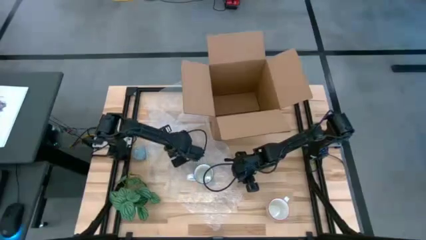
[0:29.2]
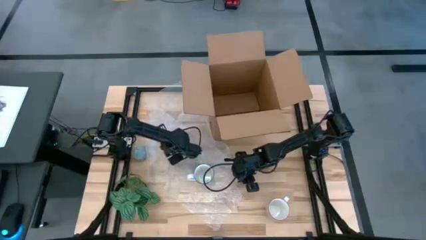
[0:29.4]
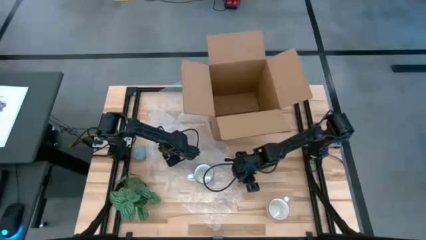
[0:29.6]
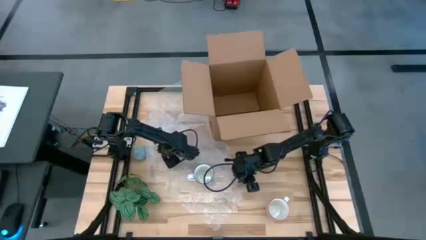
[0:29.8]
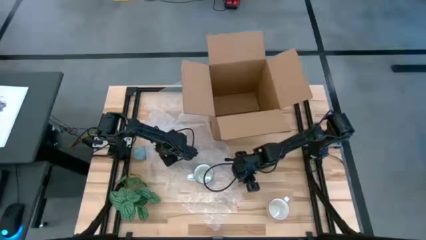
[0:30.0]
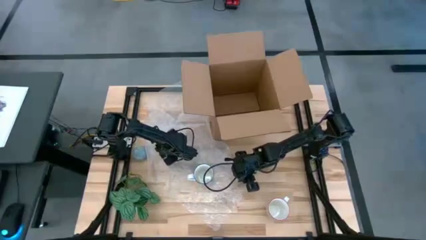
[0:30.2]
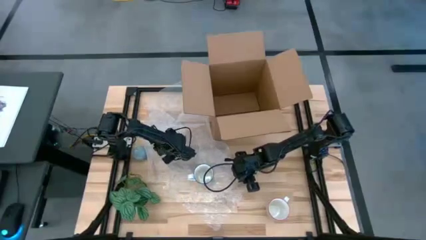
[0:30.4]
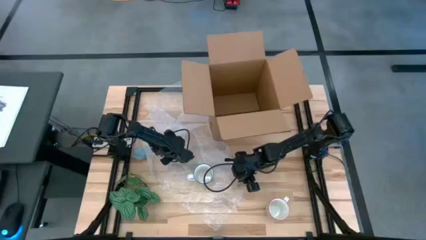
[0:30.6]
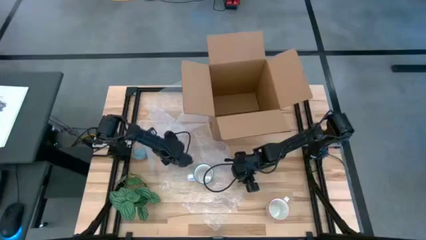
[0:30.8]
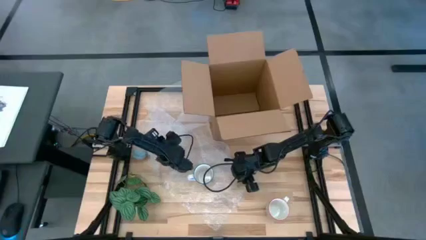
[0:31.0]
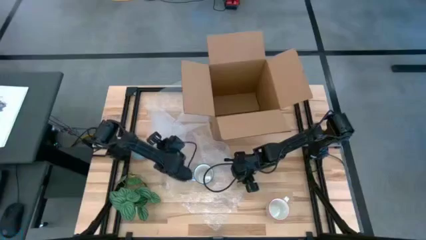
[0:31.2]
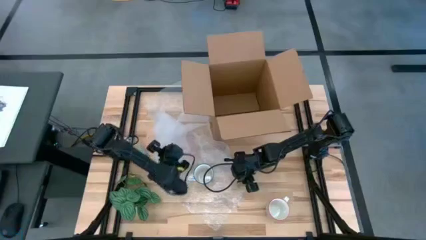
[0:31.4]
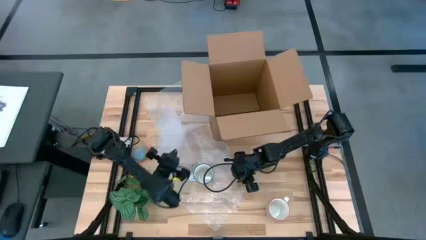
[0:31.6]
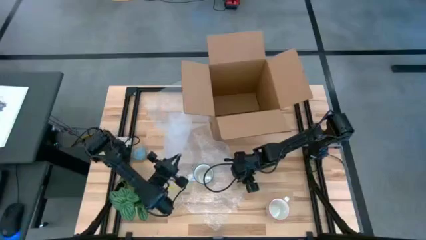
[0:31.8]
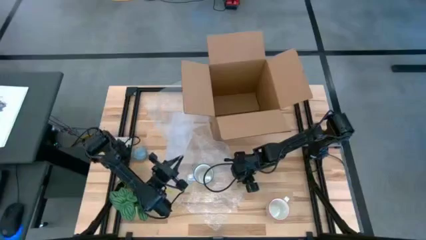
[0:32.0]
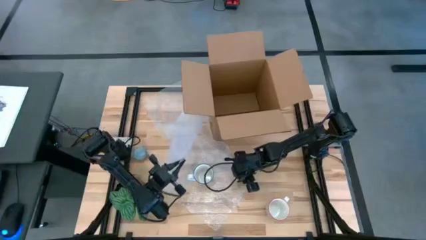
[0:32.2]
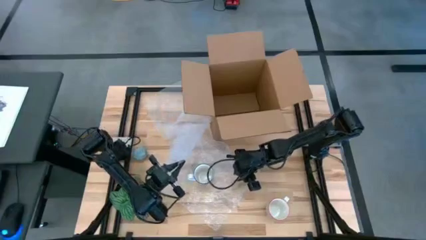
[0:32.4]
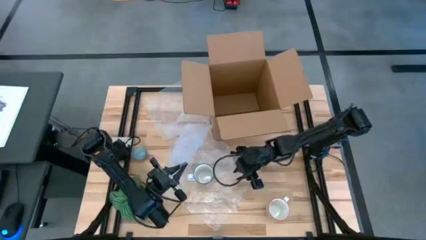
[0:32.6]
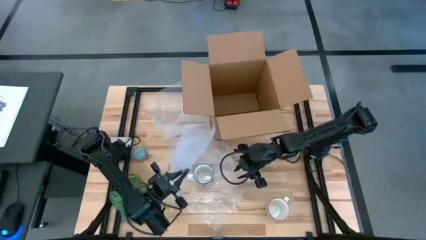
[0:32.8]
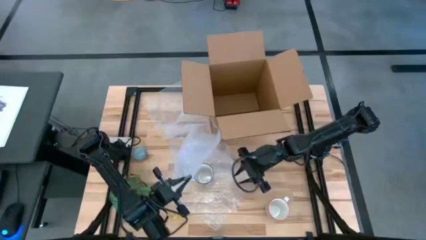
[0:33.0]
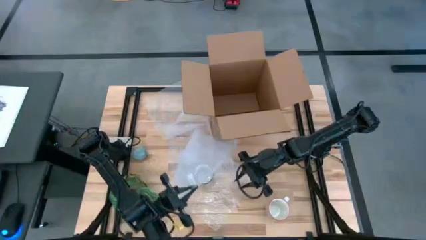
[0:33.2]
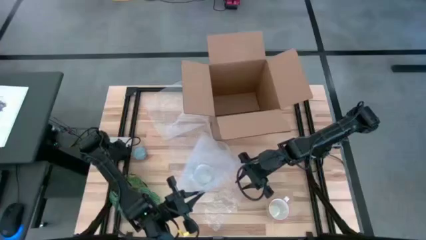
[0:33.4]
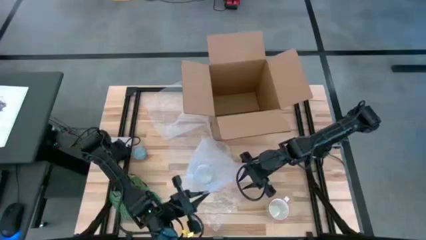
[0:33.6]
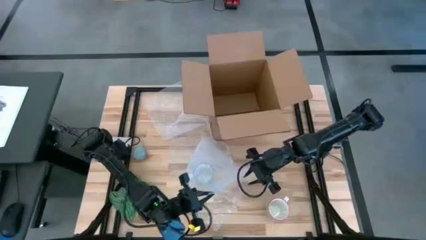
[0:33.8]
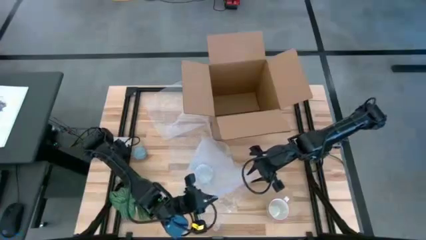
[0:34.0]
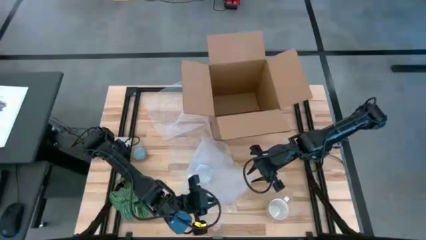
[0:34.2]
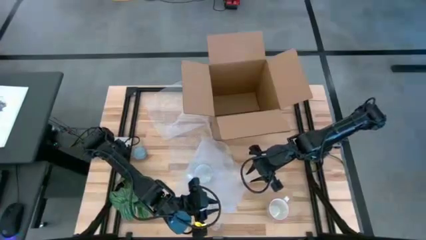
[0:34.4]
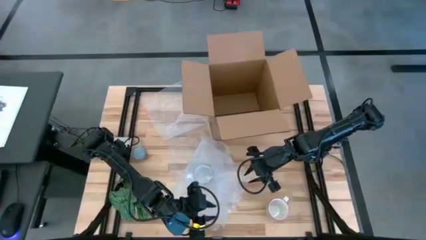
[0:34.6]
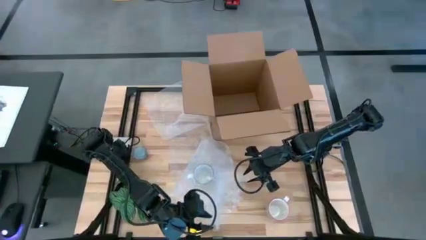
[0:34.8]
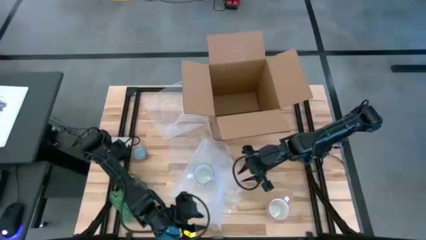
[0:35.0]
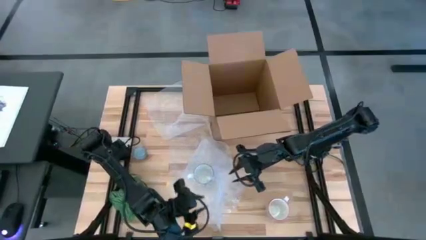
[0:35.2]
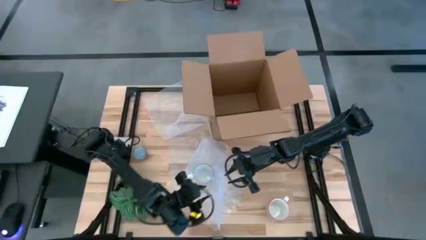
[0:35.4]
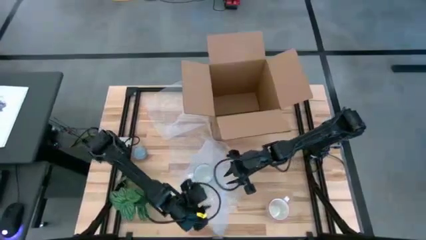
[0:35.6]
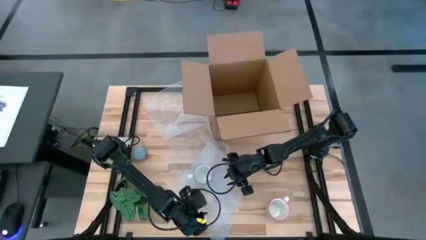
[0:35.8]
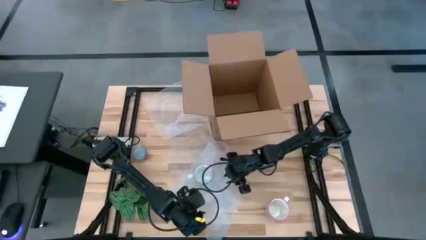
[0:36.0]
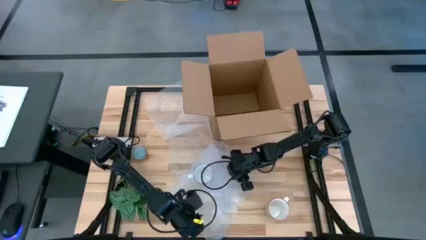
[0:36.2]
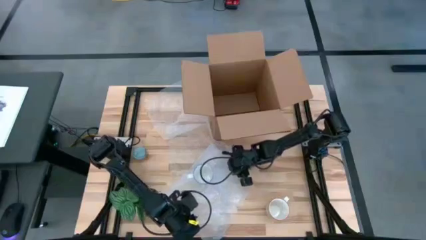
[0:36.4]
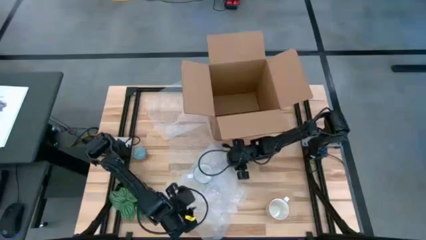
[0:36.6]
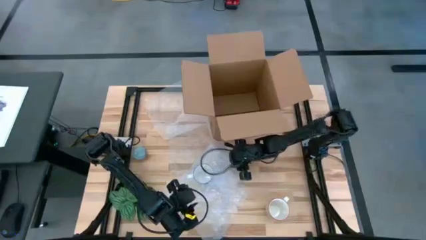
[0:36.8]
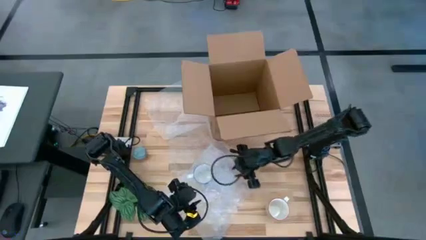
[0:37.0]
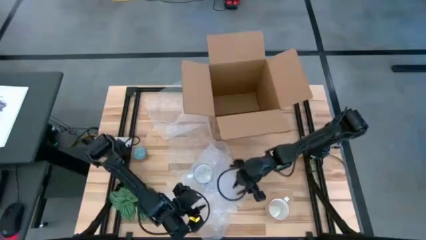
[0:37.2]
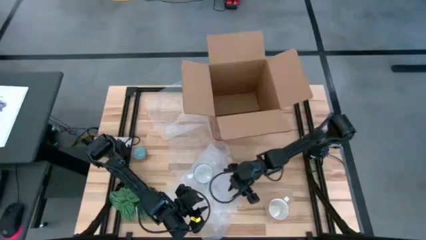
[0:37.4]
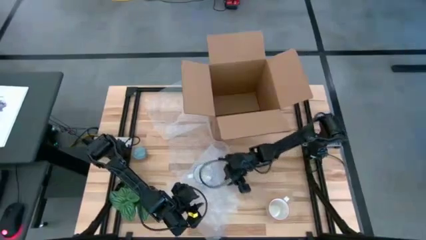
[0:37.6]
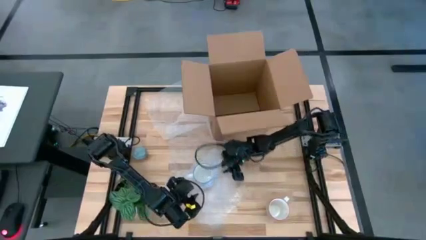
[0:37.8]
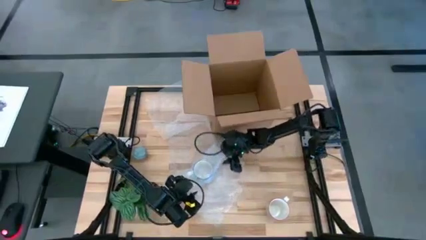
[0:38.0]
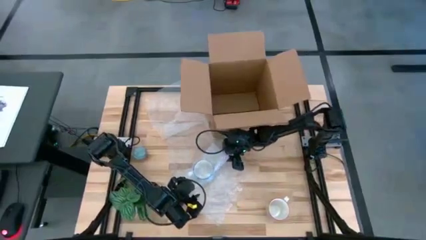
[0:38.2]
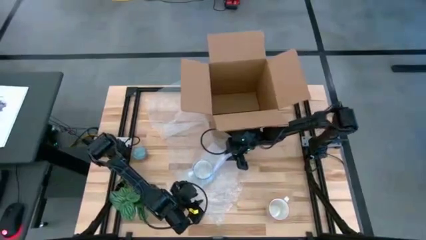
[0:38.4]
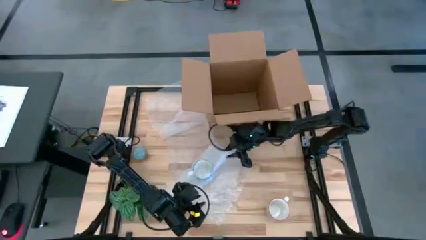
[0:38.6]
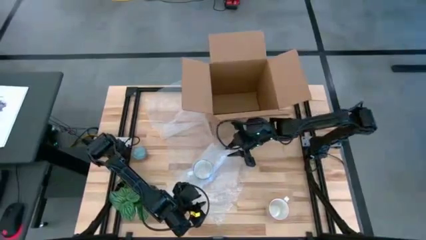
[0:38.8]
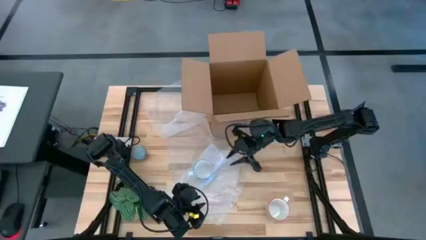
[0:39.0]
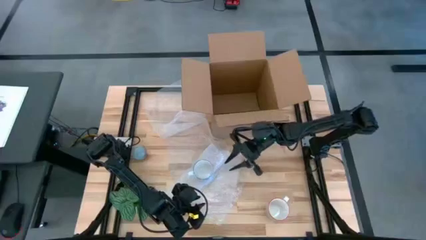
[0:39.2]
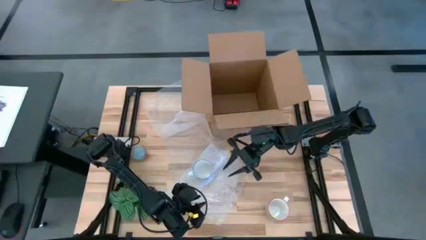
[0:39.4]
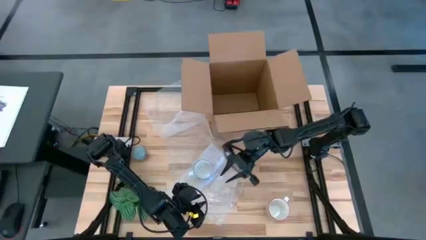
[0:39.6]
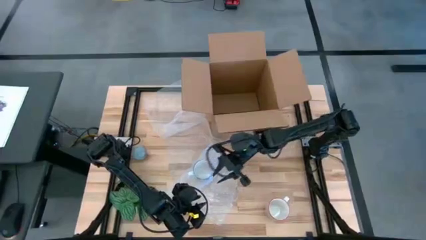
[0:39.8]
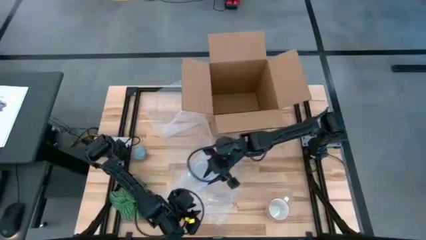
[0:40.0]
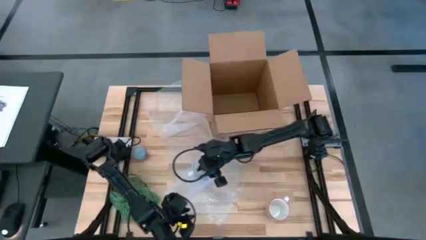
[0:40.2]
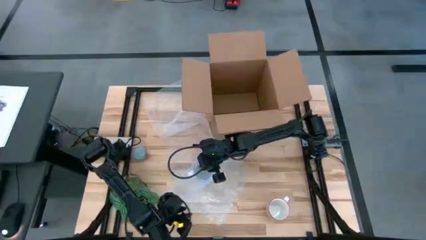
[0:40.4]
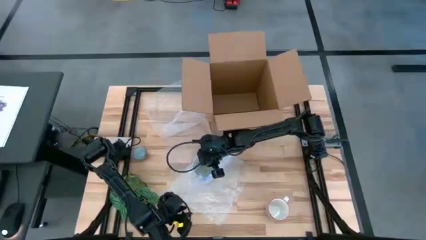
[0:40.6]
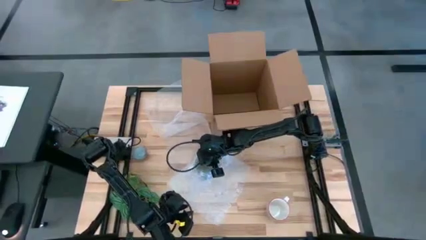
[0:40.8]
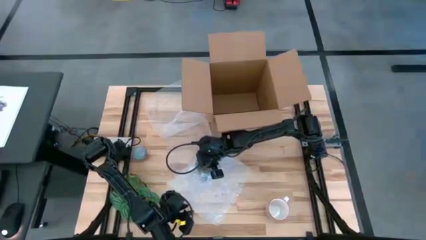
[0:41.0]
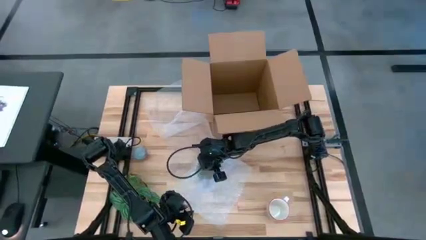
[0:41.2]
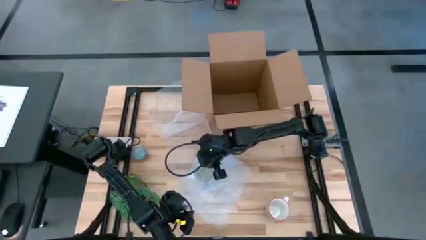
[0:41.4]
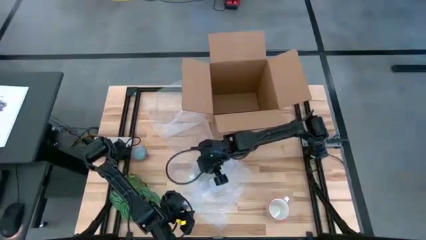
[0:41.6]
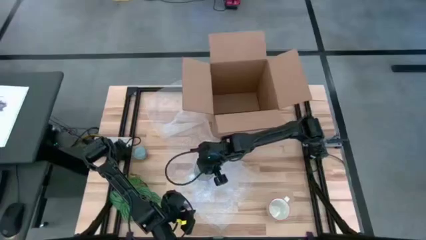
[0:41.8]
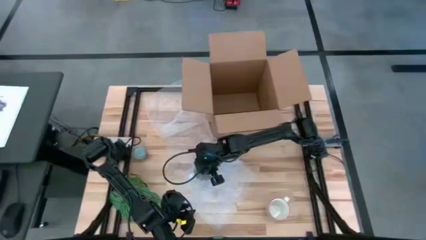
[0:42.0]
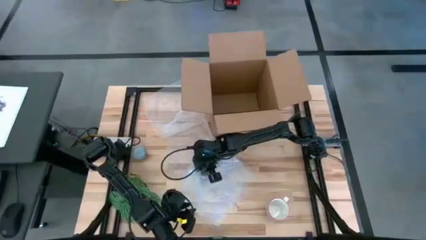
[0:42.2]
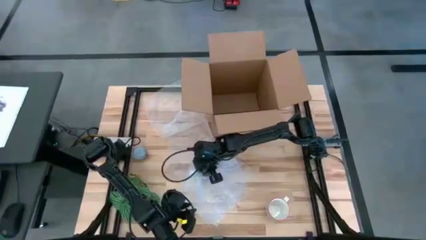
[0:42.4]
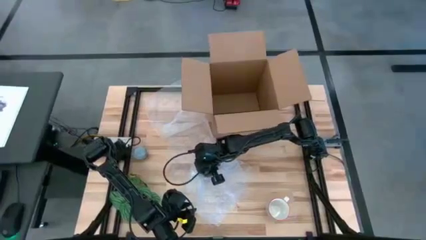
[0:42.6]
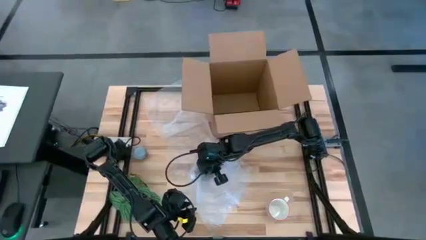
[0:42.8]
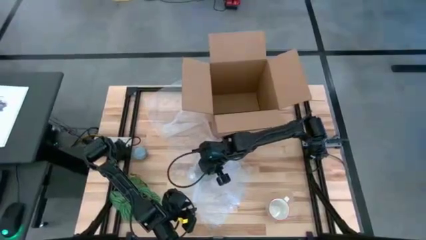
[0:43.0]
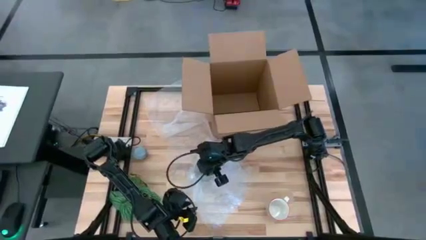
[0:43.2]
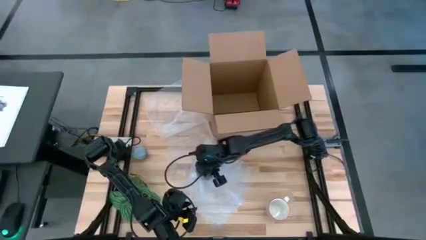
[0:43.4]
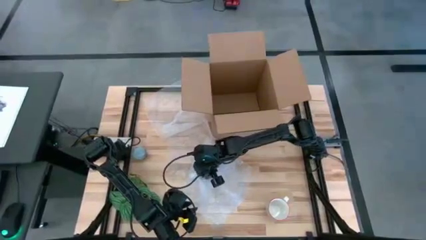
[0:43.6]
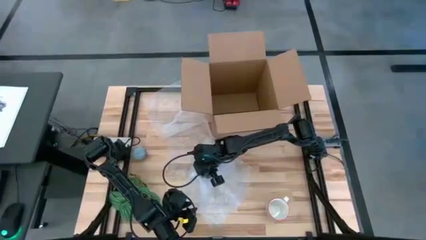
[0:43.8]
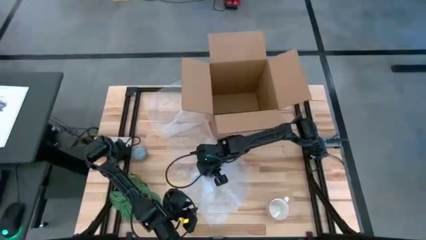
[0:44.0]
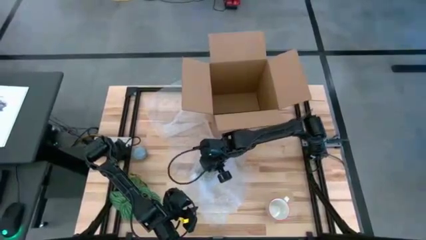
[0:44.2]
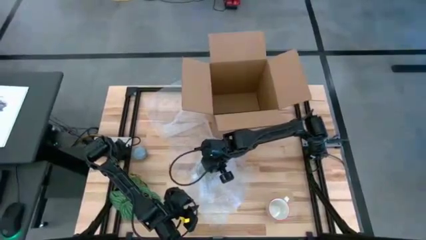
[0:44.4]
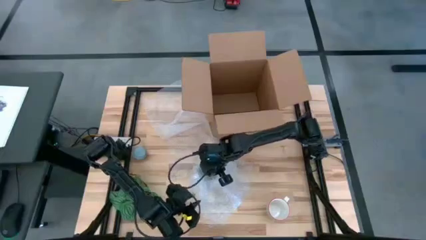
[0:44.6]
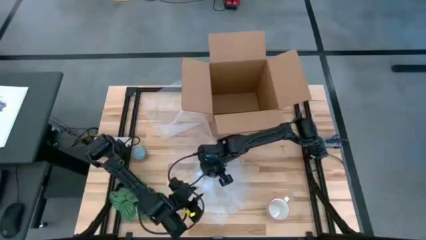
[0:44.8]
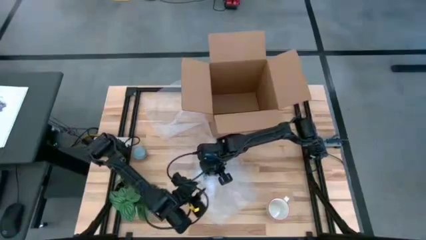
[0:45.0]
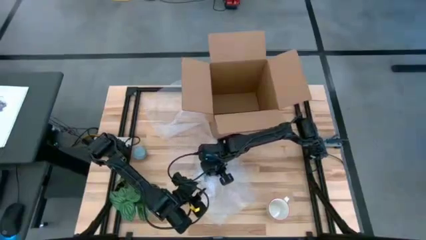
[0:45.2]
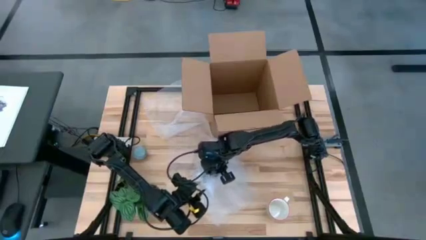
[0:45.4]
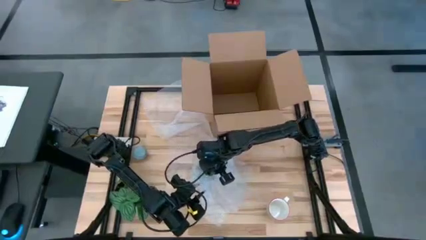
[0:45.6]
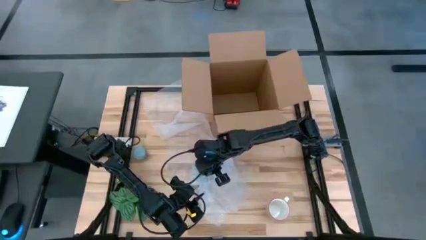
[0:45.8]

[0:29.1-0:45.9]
Task: wrap mug
Wrap the white blue mug with bubble wrap
